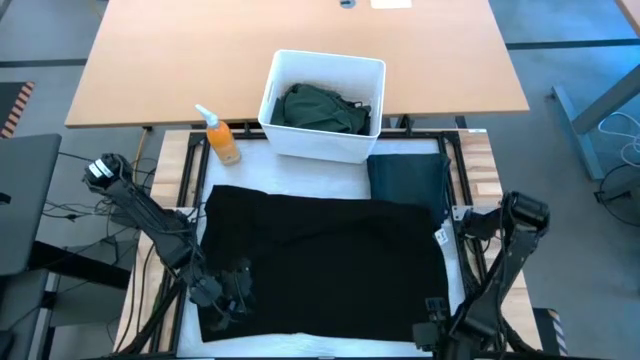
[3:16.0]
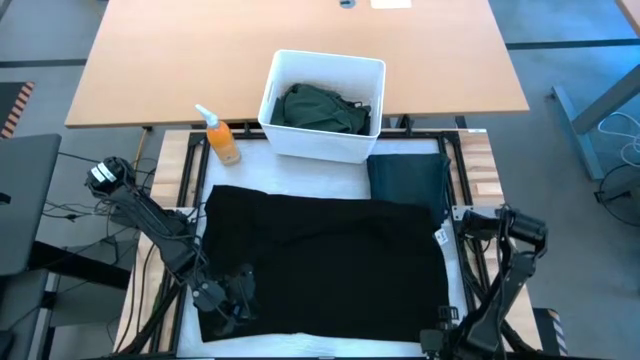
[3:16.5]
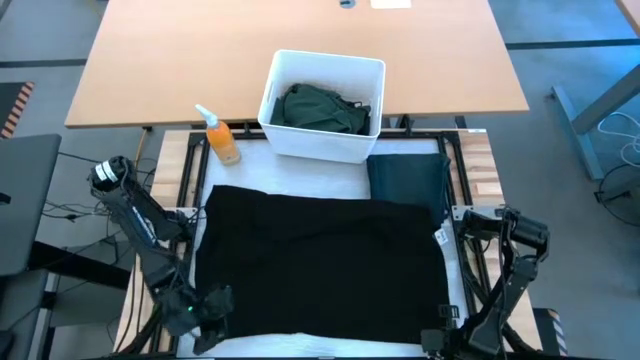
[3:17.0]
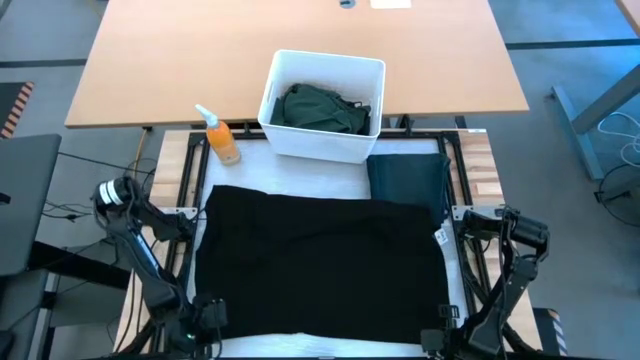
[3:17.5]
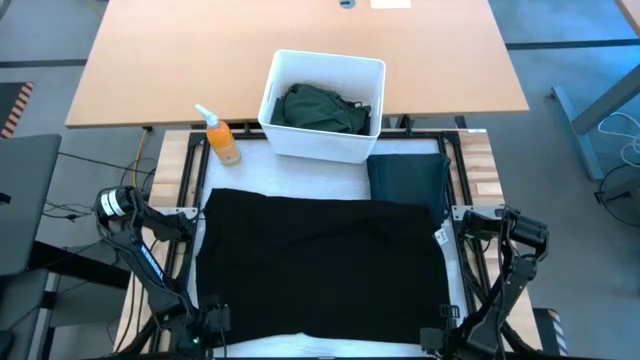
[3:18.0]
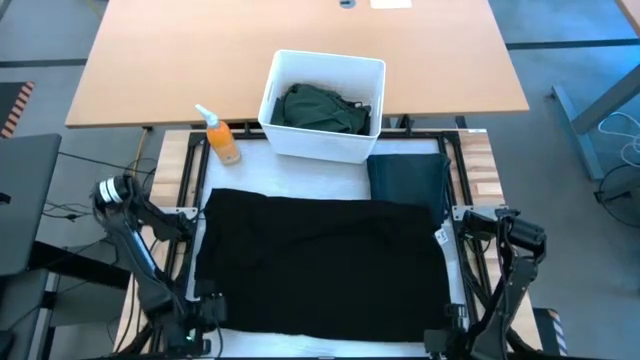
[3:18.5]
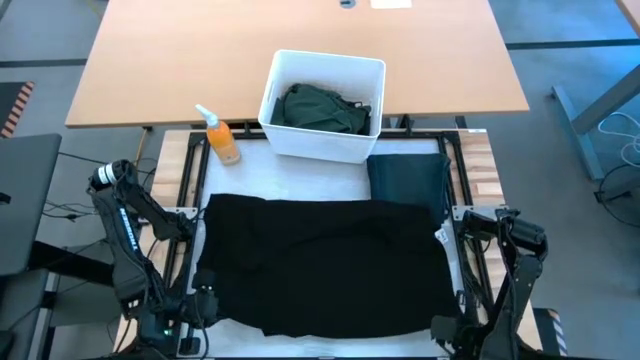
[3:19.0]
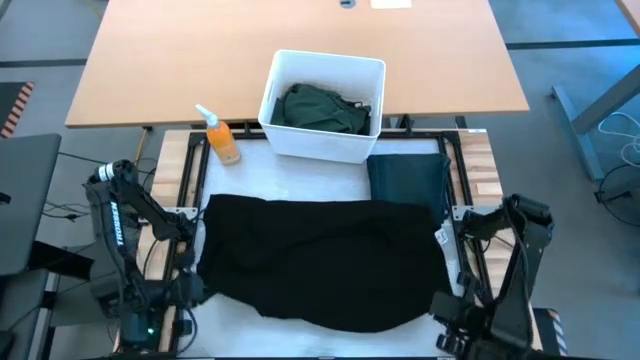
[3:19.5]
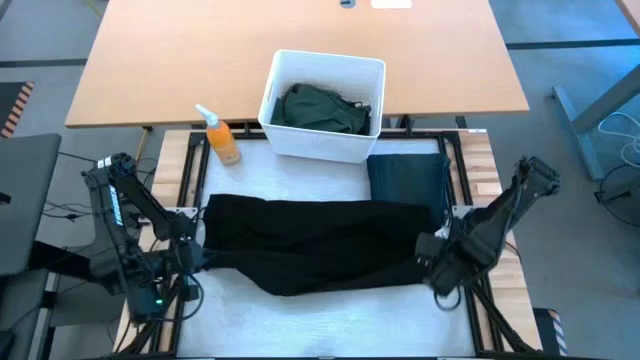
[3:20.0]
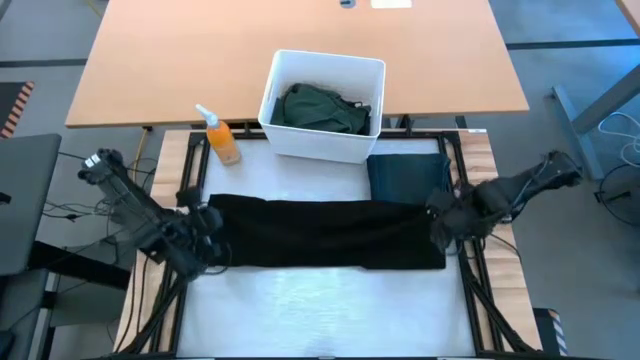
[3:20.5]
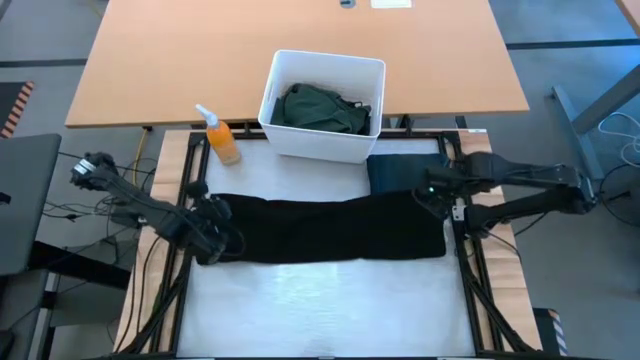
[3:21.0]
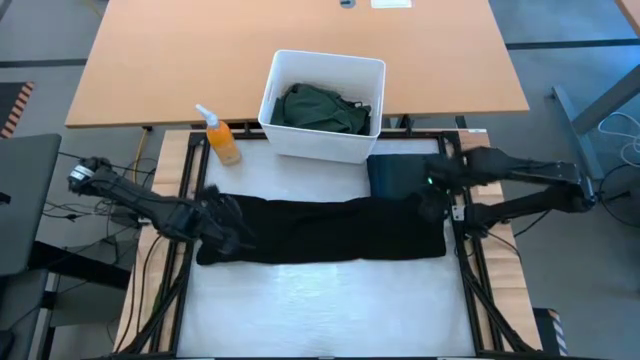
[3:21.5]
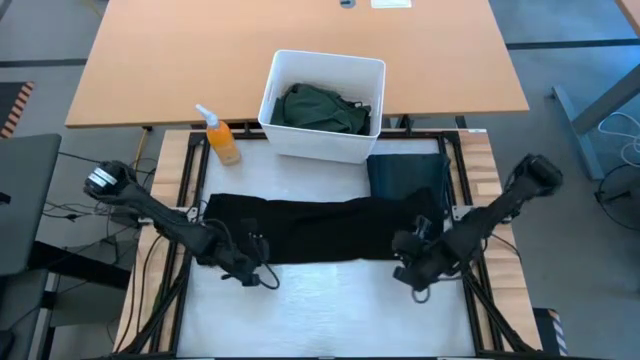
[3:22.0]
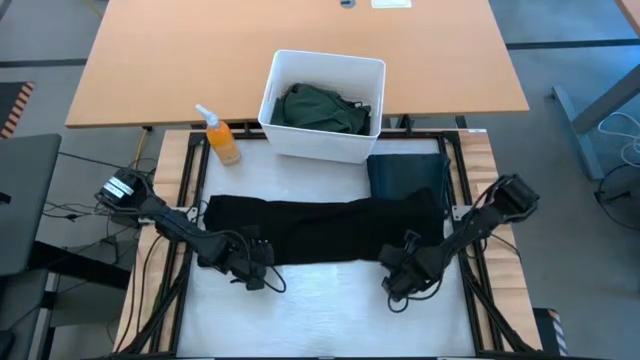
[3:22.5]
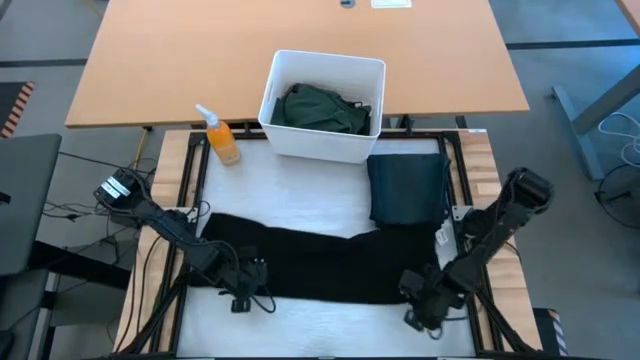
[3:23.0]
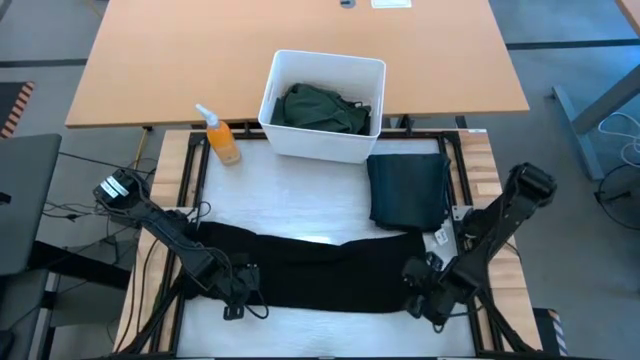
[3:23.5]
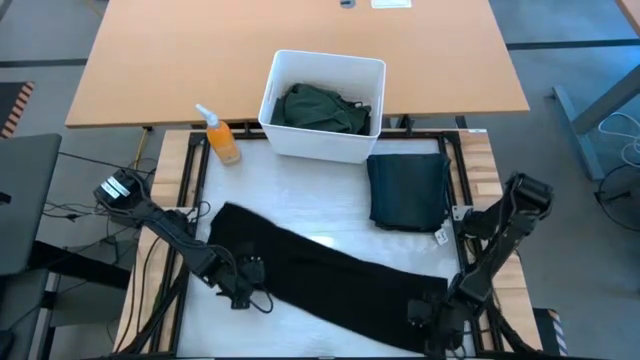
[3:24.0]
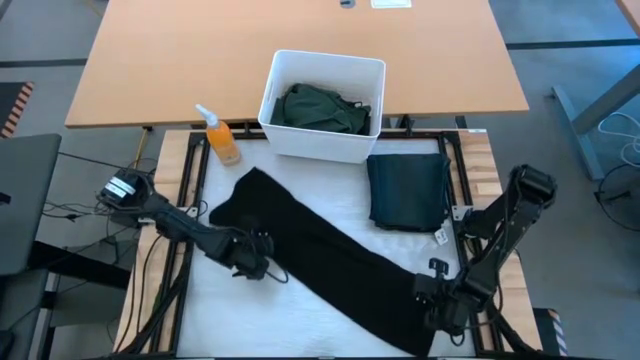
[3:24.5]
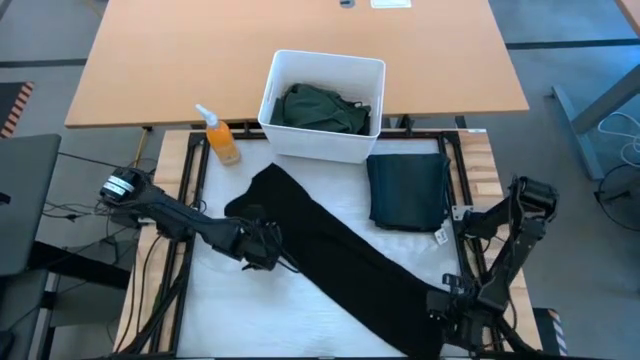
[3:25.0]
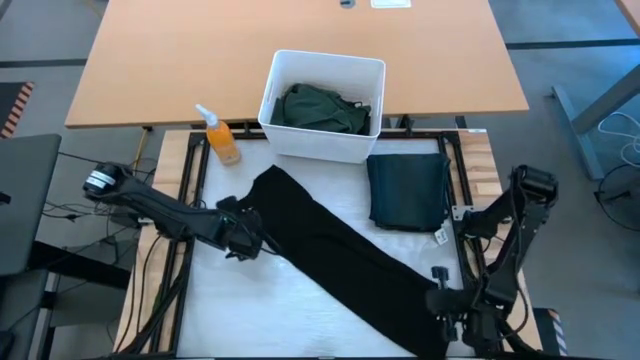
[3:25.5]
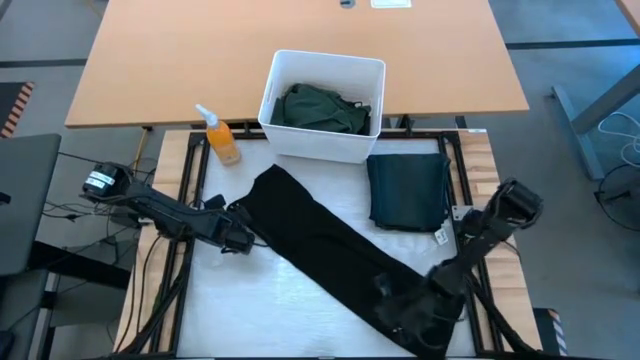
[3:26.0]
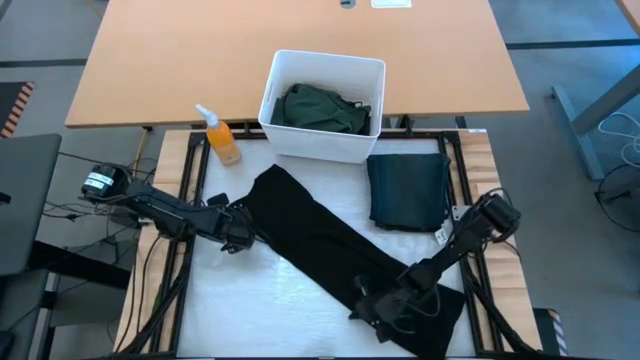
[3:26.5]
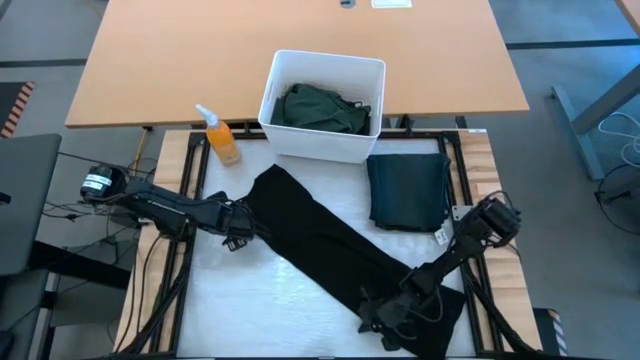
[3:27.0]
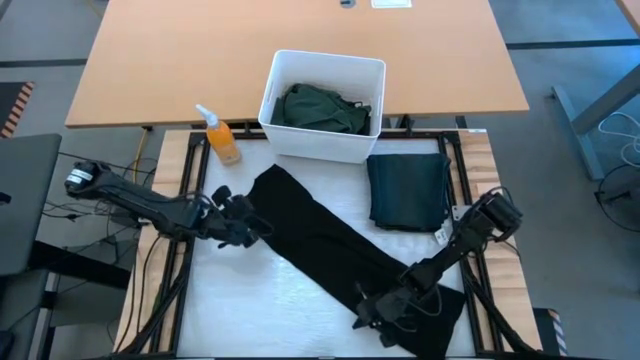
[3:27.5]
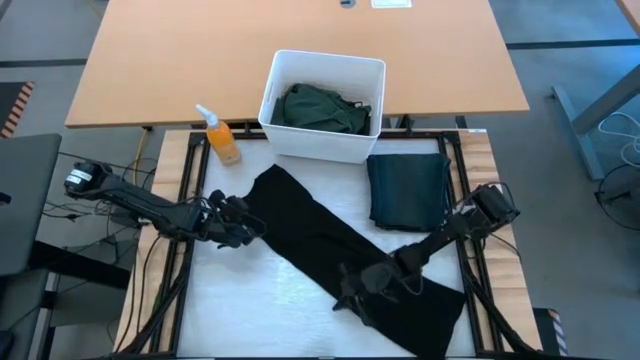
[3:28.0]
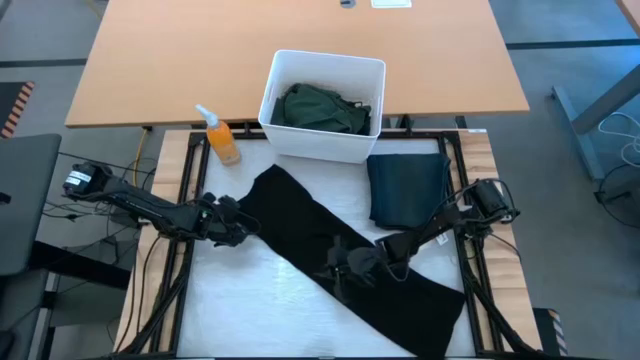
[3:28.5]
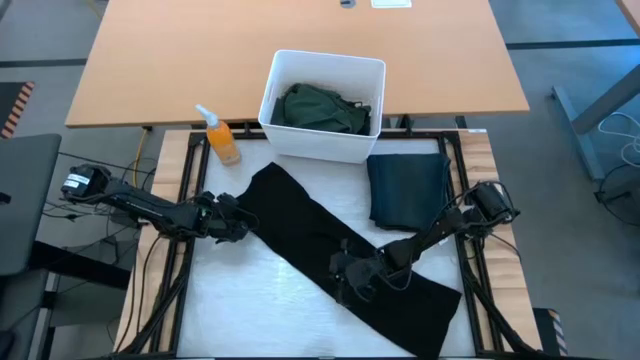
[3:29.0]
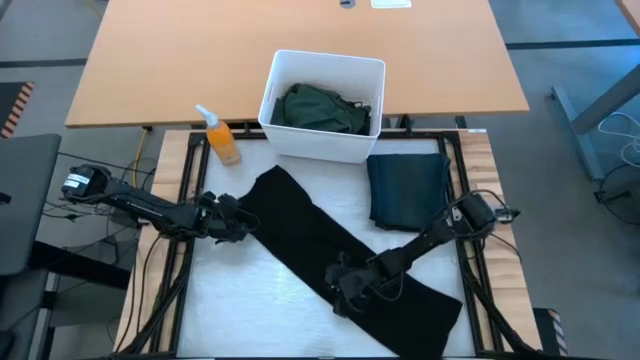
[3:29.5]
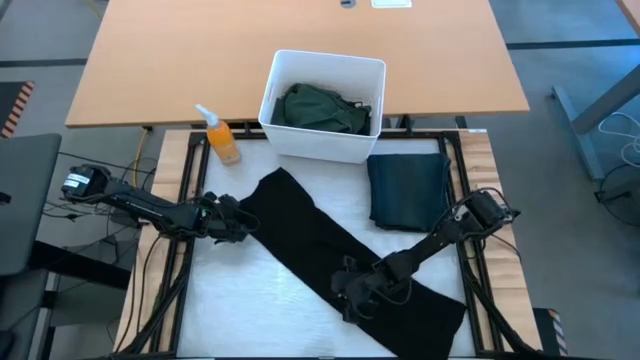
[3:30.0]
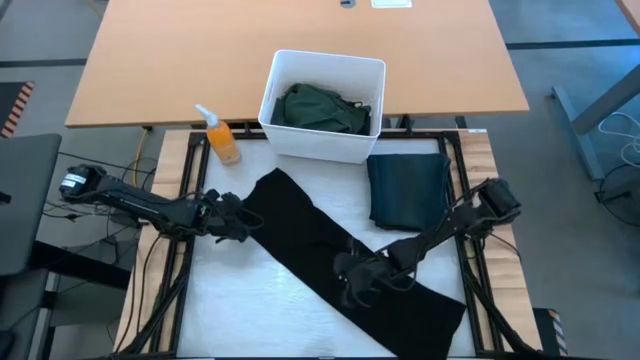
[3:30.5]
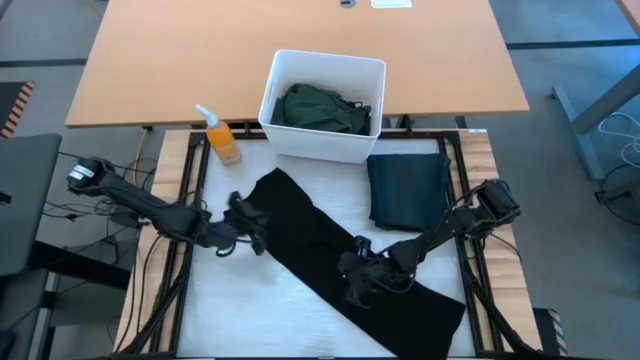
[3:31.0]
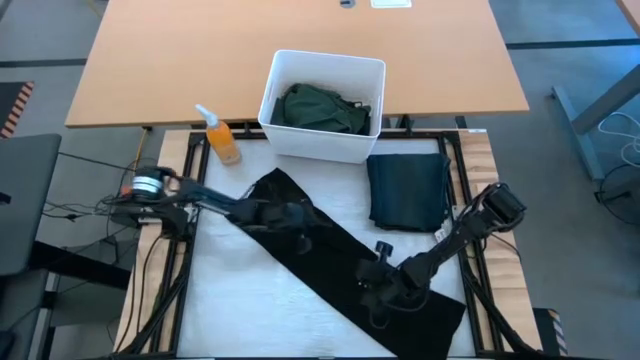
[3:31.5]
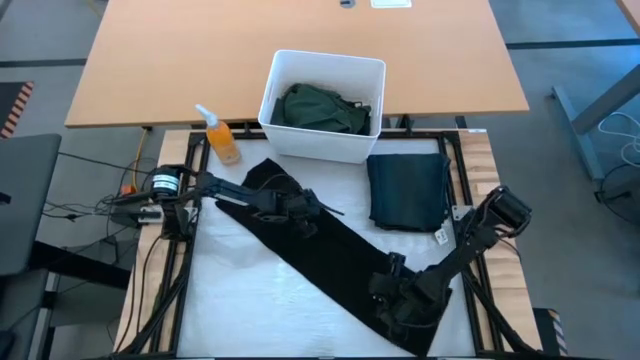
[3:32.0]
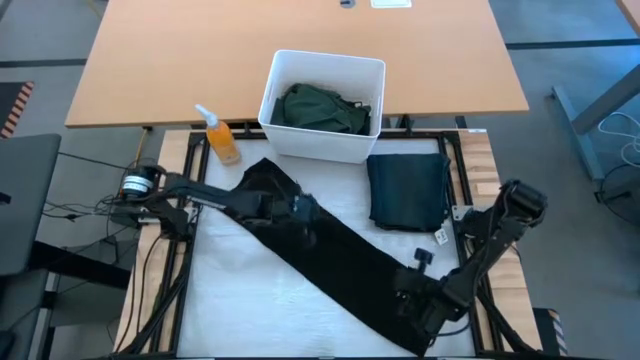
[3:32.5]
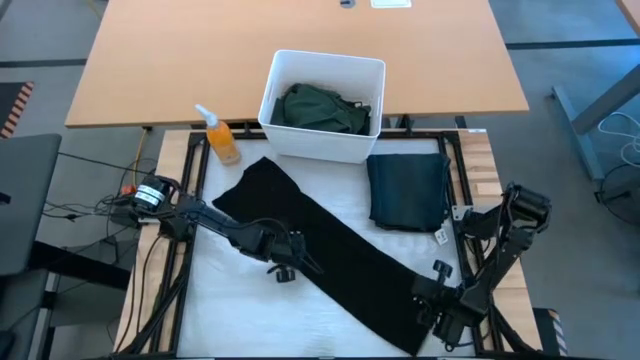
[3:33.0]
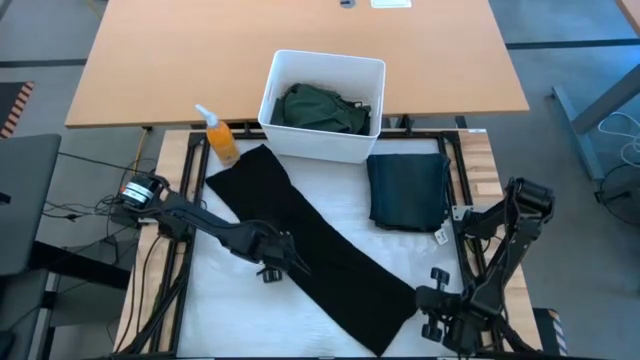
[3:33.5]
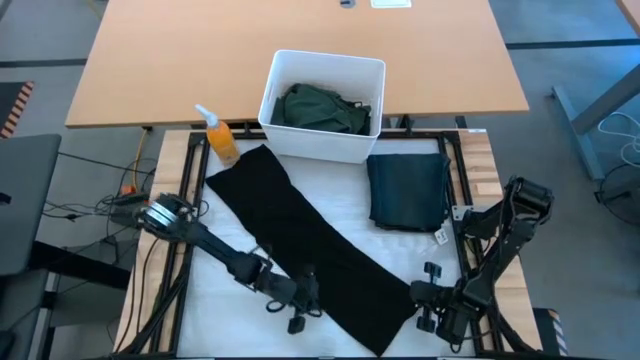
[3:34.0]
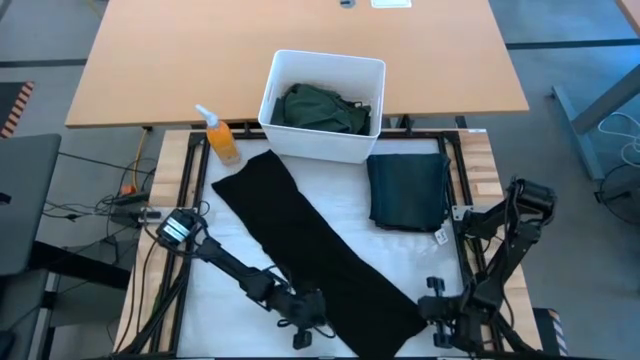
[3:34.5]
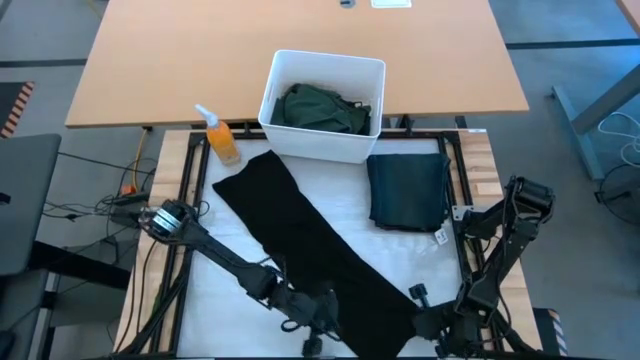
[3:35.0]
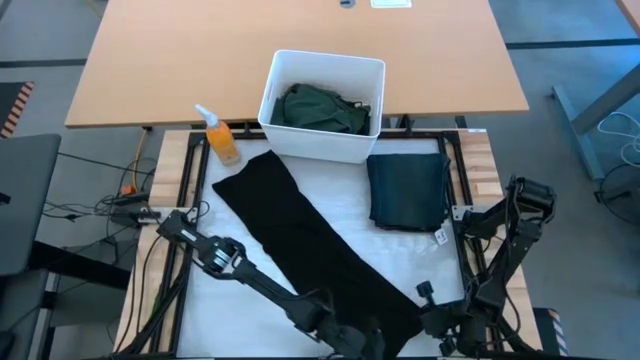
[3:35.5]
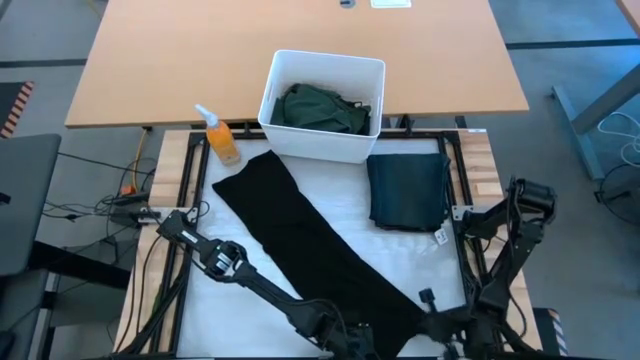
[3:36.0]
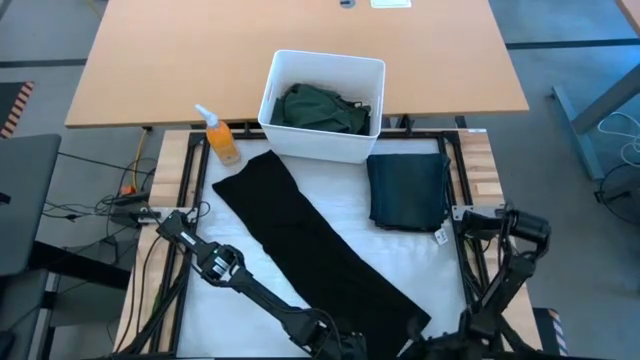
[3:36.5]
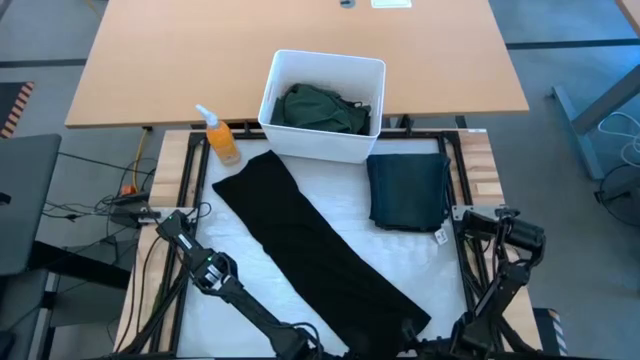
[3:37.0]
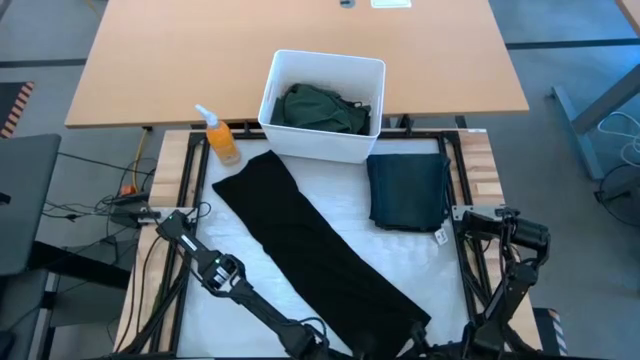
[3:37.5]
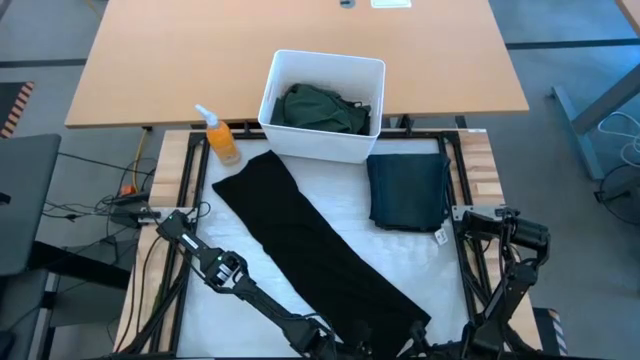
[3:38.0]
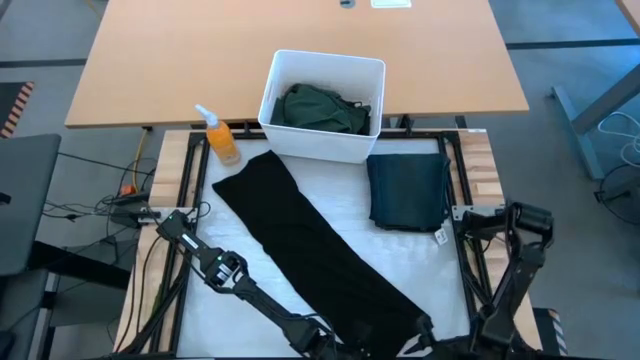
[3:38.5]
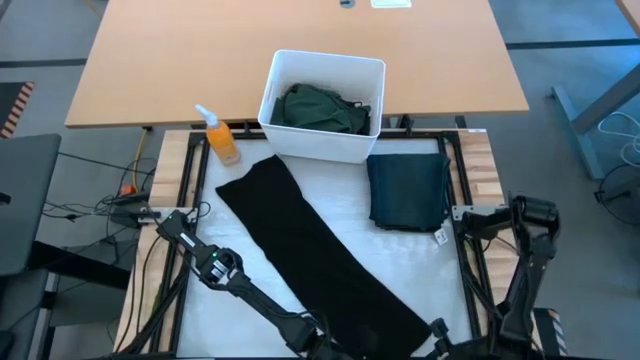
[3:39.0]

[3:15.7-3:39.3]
Task: Fold laundry
Fold the black t-shirt
